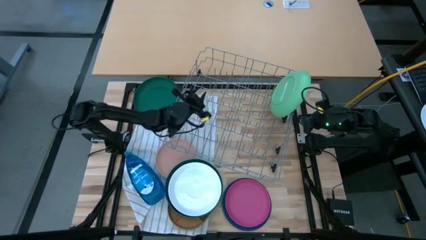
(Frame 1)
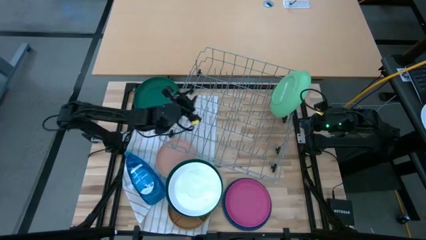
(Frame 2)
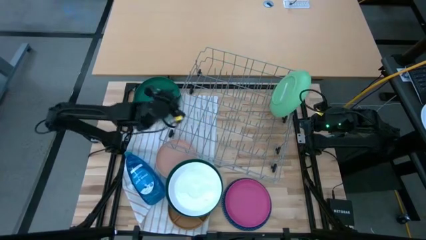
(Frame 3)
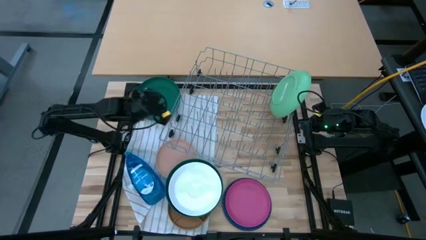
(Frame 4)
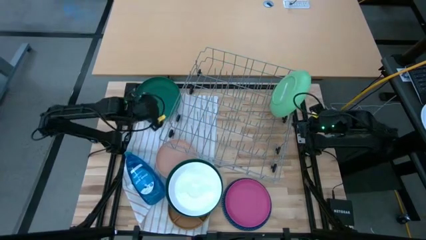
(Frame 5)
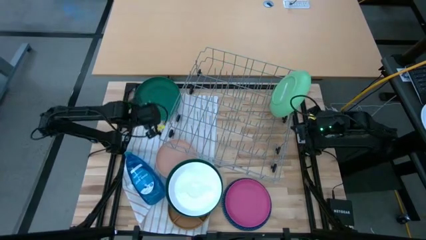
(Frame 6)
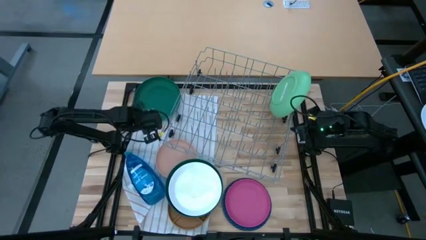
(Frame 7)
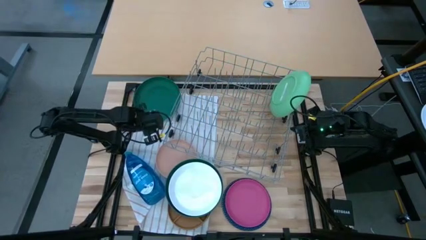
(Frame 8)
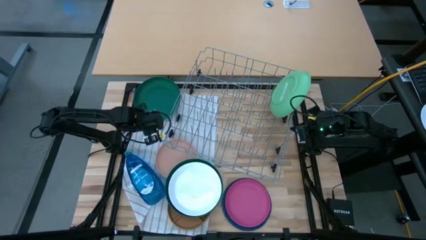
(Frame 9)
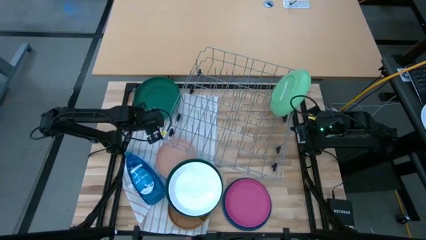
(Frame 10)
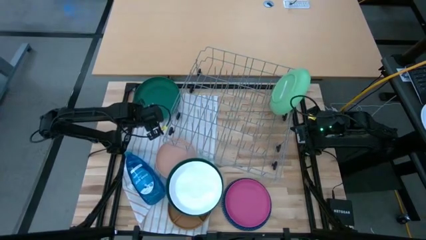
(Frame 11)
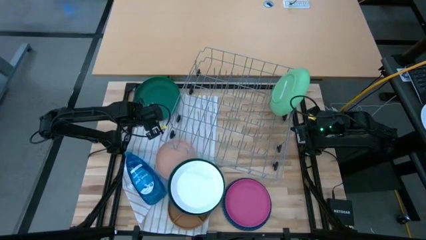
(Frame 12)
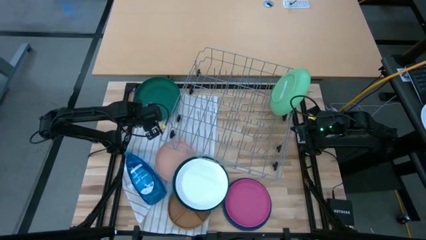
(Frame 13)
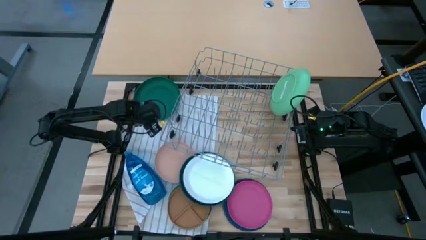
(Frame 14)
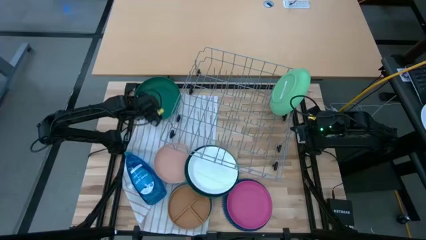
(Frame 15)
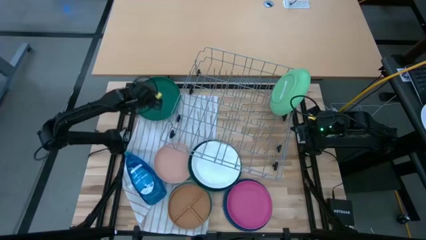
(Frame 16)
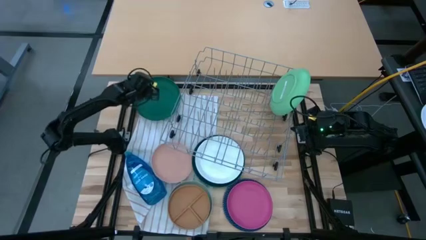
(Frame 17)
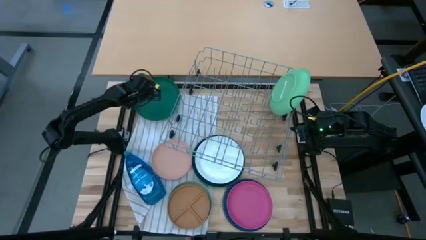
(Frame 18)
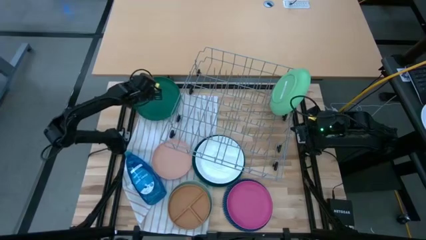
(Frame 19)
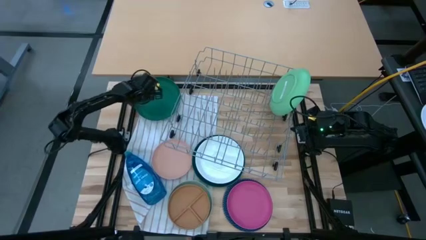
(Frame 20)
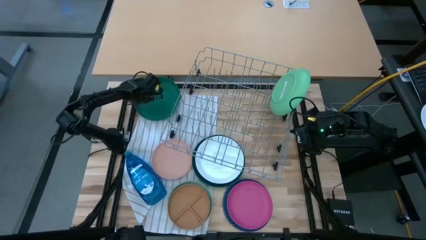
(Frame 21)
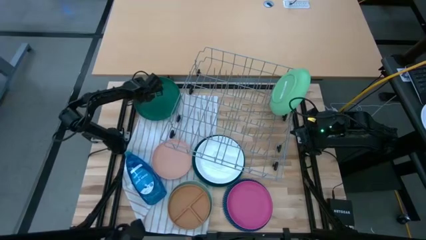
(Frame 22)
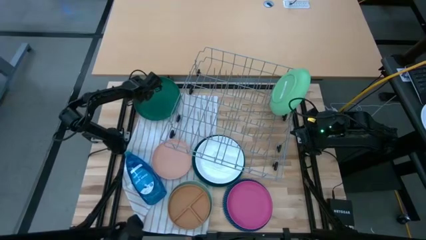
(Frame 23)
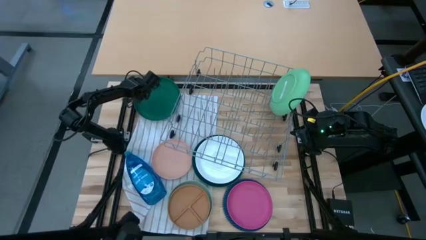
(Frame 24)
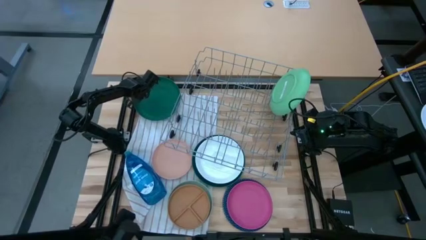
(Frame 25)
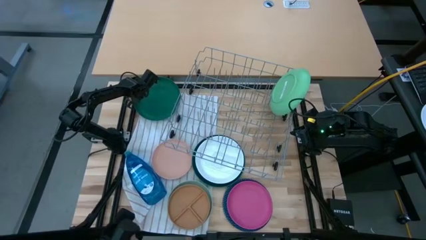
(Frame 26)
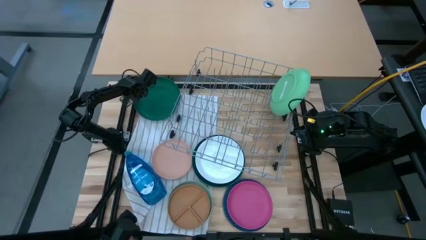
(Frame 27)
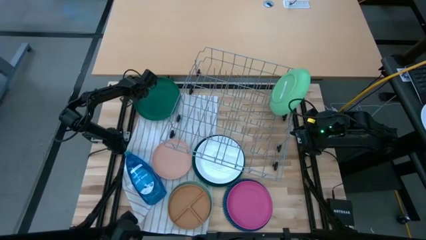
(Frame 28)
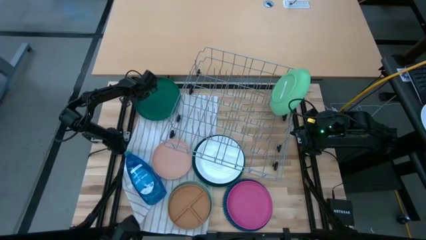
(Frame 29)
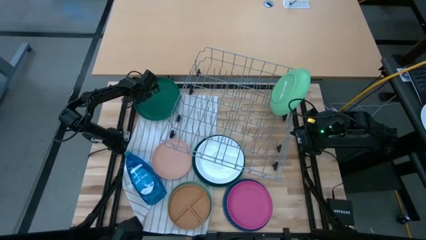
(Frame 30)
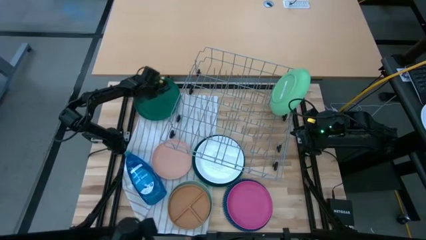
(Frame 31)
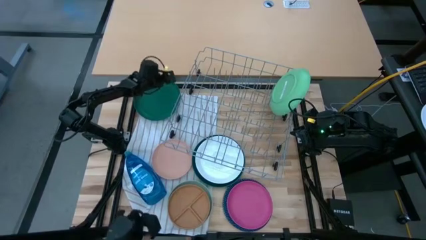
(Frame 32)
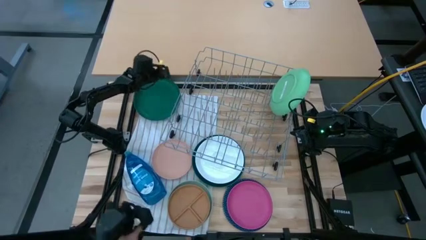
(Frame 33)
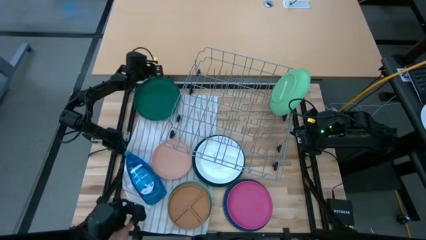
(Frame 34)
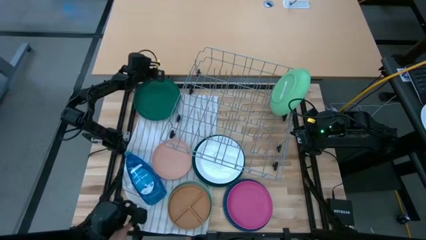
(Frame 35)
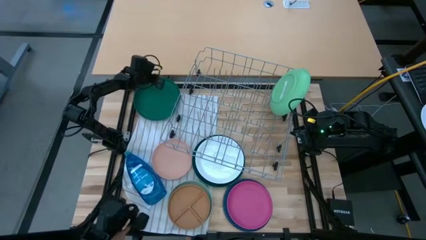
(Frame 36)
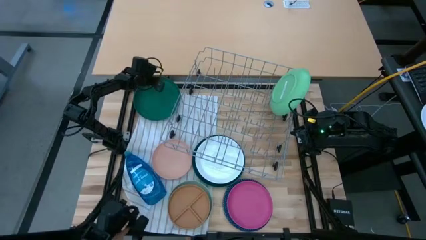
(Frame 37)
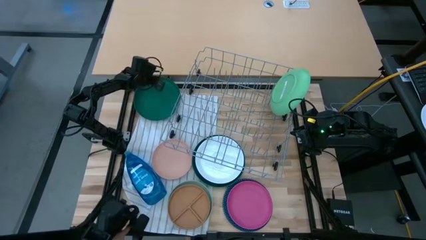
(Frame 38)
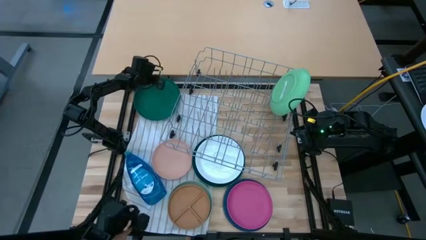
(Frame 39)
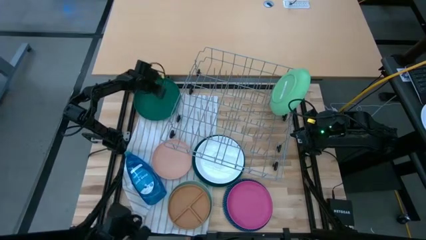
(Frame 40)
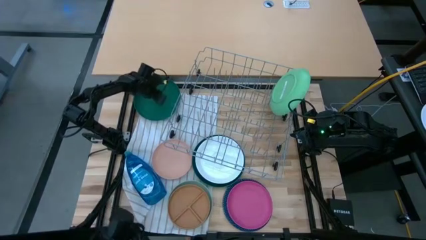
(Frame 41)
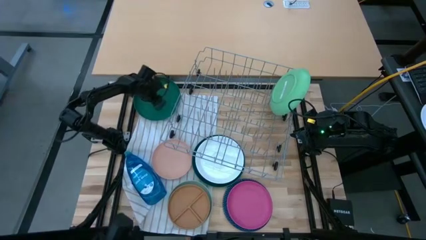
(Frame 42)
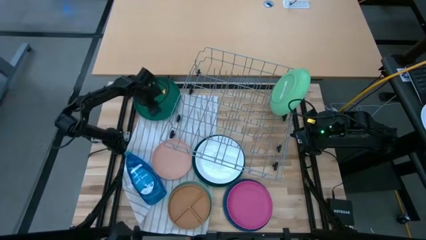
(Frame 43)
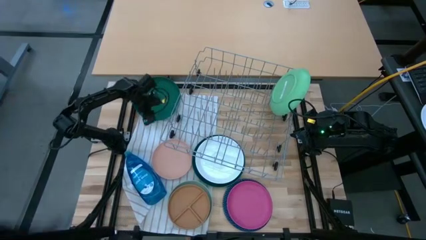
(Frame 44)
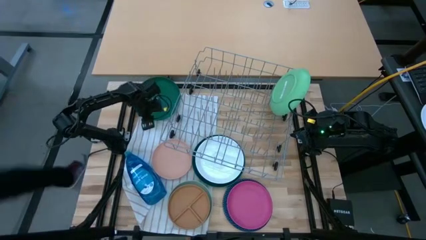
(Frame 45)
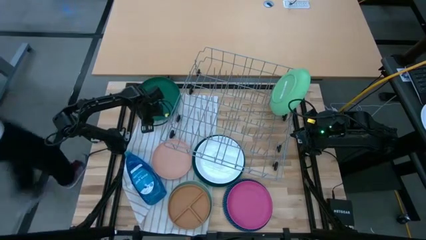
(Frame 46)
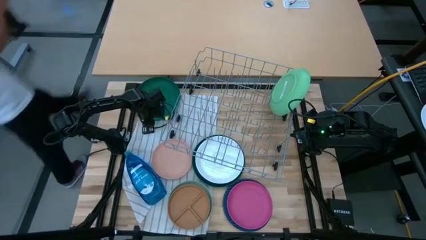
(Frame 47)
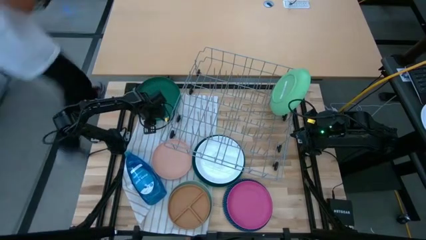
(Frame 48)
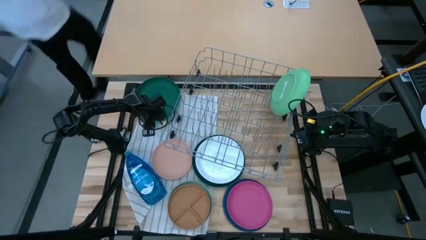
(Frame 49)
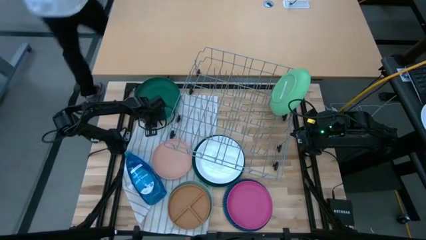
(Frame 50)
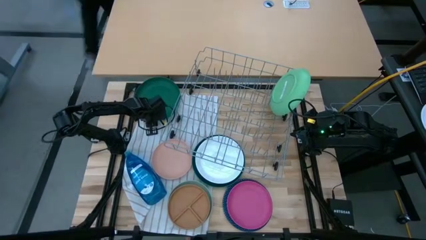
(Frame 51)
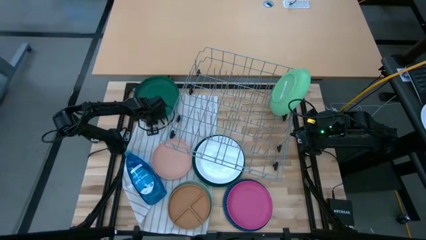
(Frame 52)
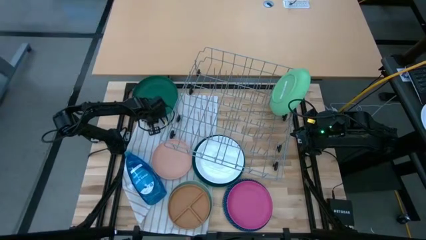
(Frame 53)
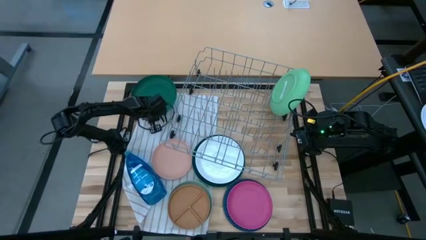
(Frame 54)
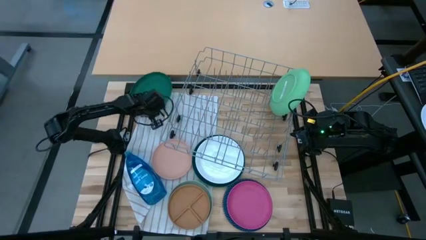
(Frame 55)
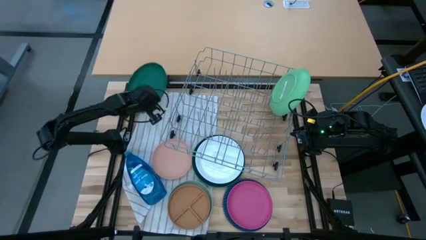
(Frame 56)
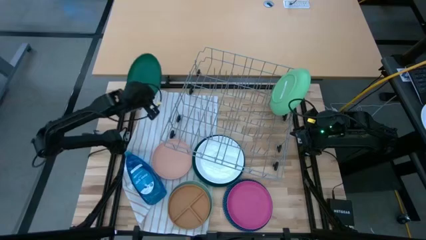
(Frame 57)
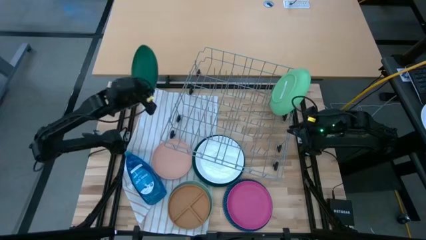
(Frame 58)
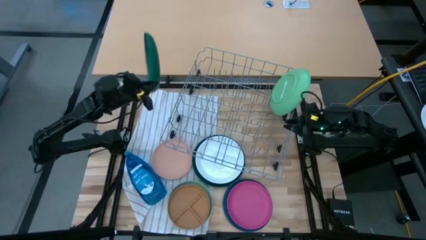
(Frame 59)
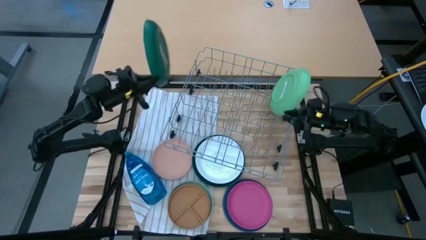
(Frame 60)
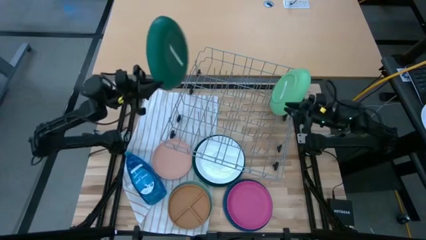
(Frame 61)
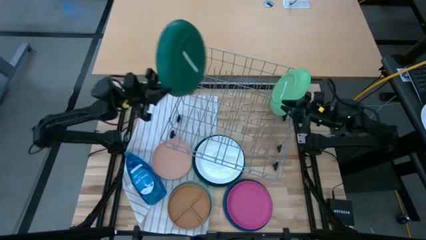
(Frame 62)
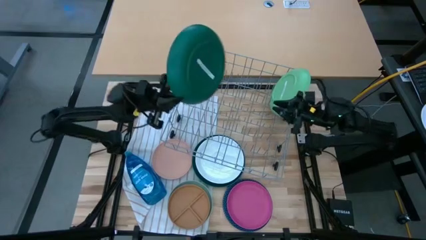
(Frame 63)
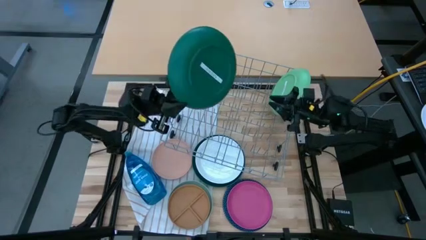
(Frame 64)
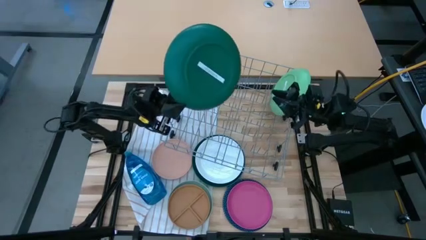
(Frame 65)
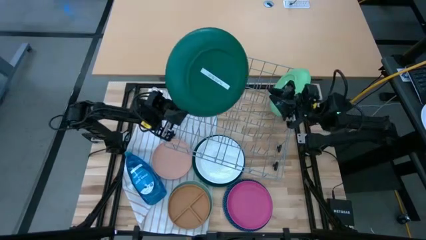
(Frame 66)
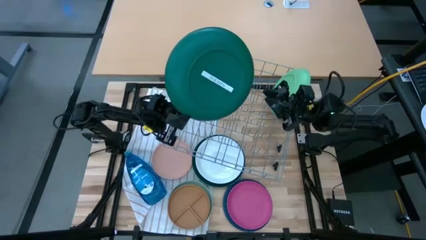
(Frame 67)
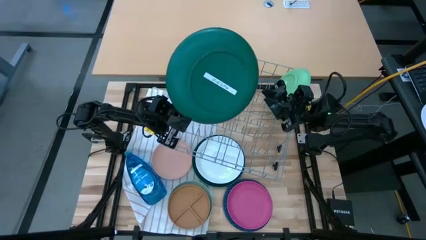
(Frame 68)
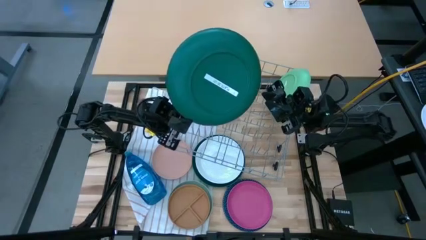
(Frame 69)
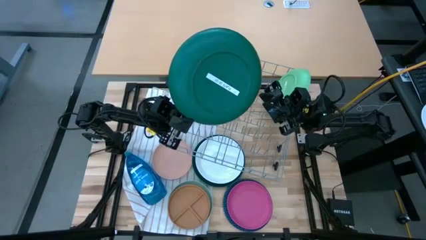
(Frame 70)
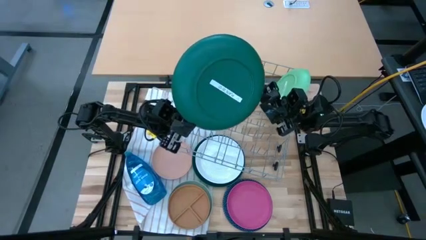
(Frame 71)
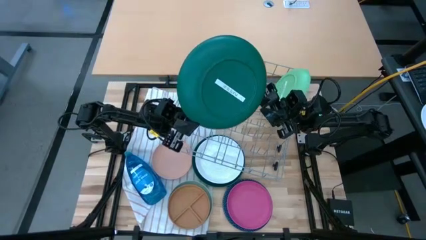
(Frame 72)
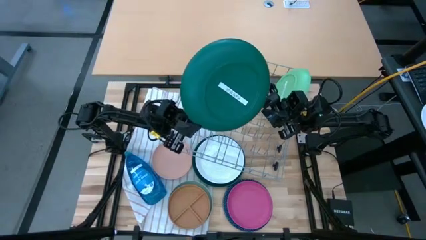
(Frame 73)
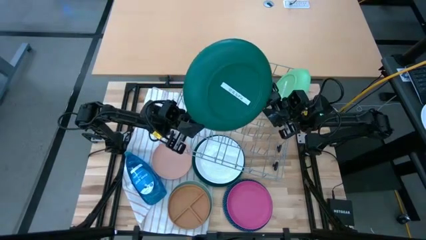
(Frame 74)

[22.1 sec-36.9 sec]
Task: Sort dishes
Put the dark green plate in the dish rack

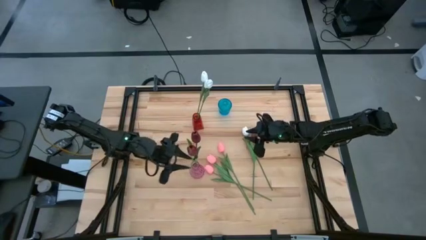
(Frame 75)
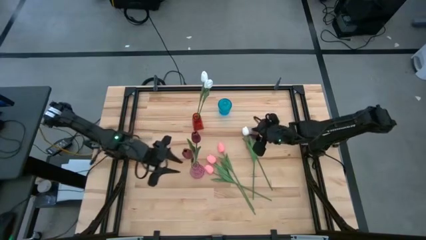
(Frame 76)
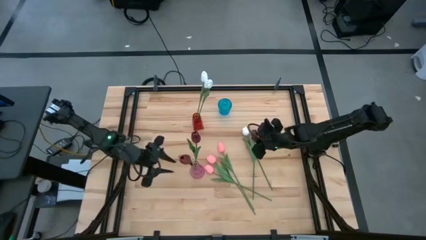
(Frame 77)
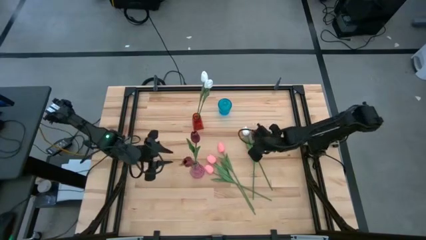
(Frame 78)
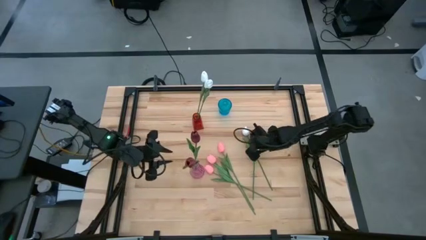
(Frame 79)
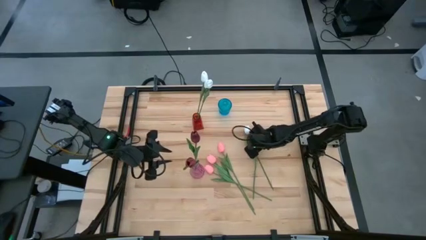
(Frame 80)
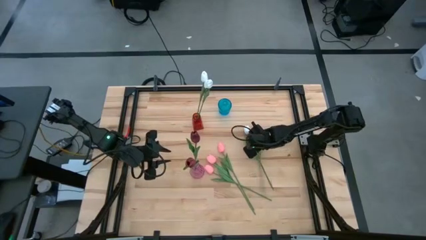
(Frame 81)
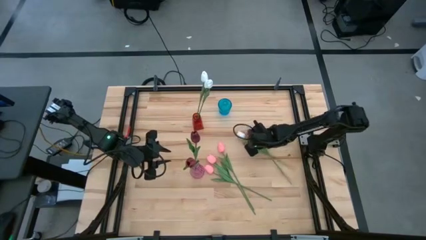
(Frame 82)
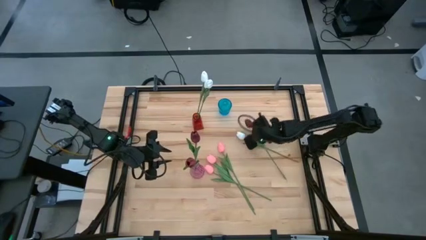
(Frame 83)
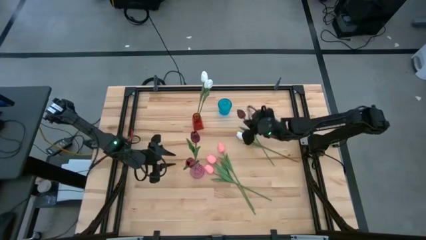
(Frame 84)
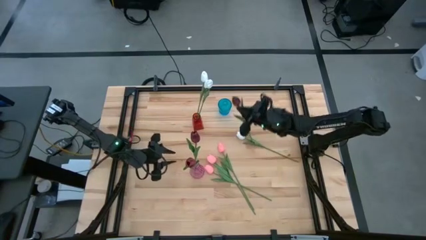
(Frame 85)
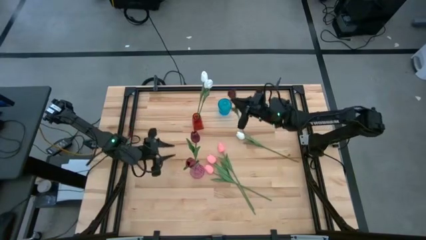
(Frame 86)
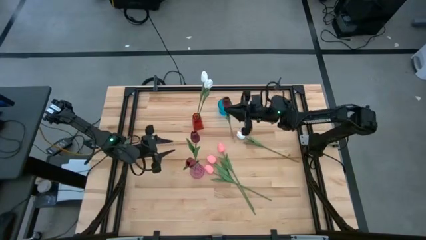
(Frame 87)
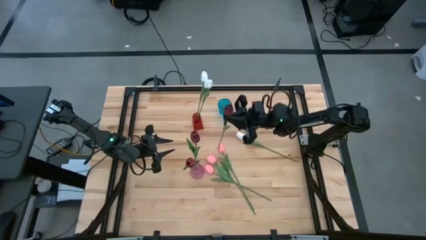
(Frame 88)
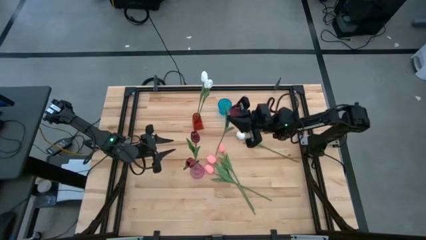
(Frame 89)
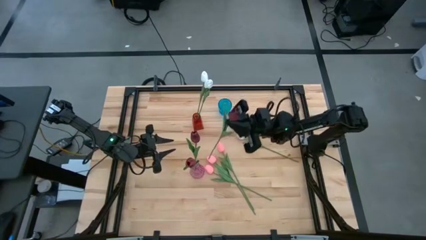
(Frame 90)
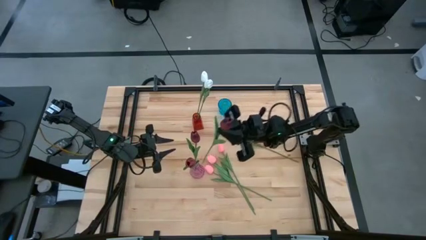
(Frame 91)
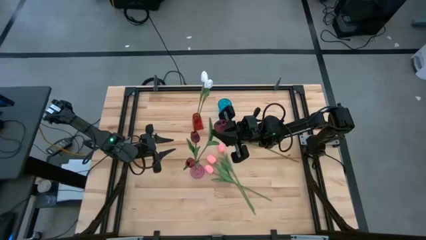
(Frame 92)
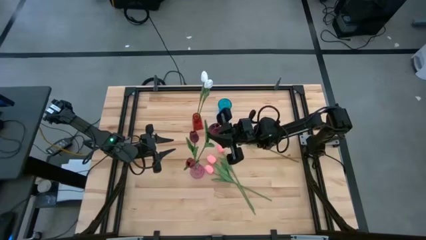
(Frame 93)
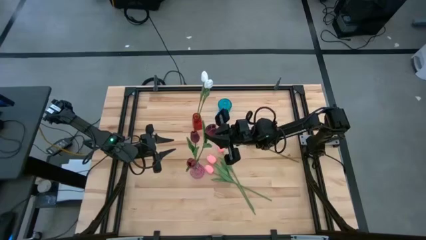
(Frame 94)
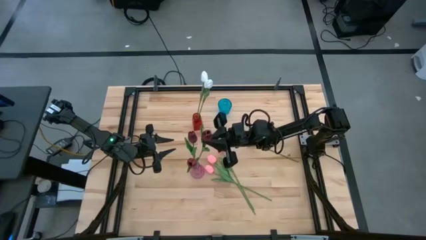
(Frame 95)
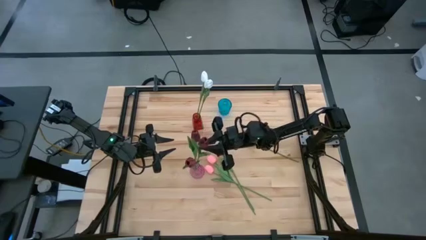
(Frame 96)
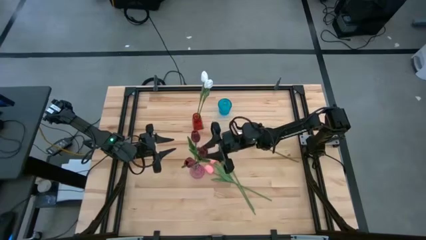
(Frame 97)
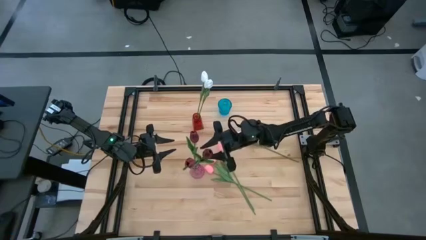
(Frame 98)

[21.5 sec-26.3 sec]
Task: Sort flowers into vase by color
Put the red tulip into the pink flower vase
